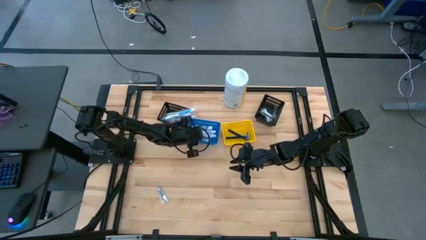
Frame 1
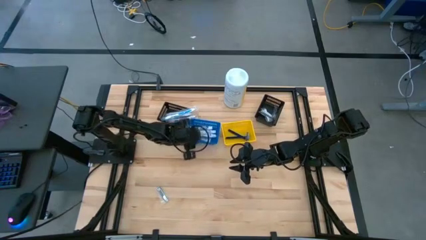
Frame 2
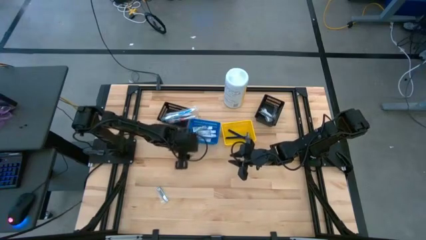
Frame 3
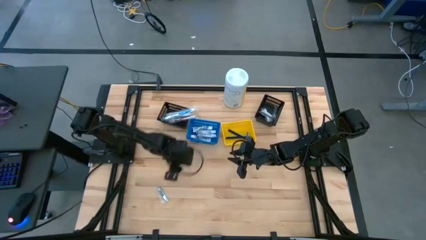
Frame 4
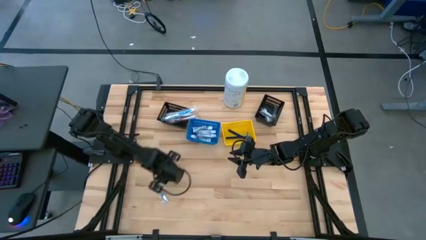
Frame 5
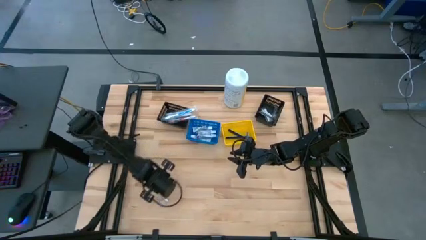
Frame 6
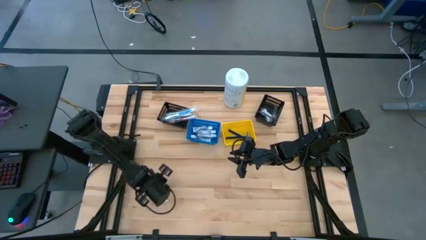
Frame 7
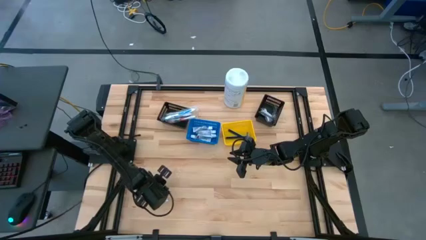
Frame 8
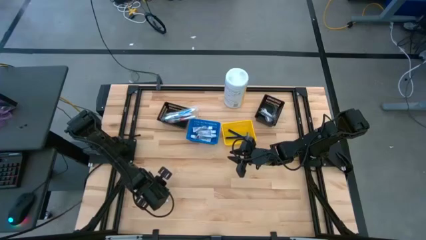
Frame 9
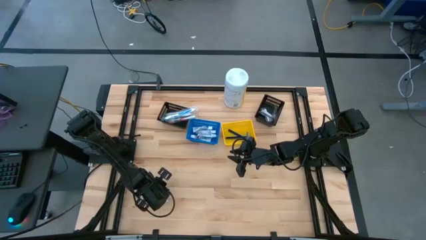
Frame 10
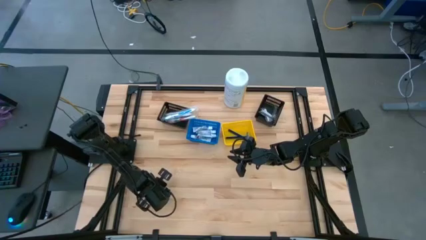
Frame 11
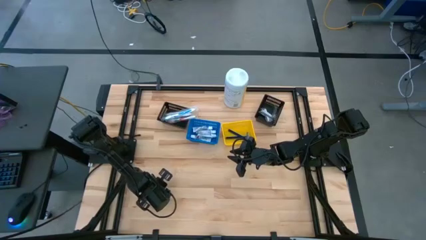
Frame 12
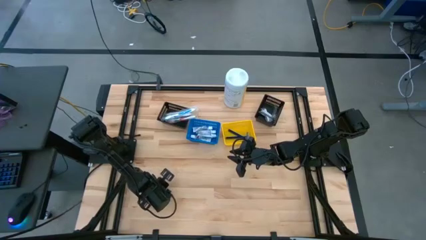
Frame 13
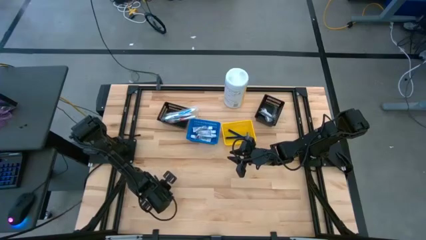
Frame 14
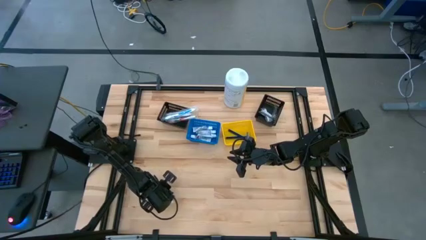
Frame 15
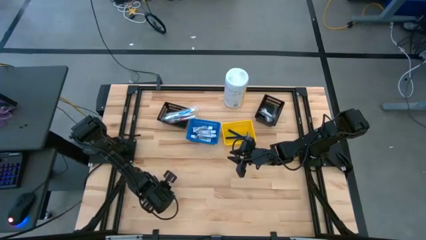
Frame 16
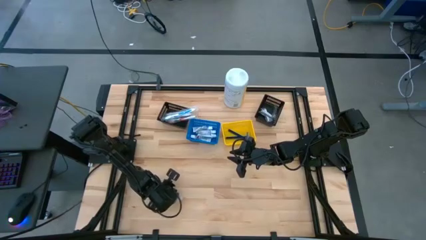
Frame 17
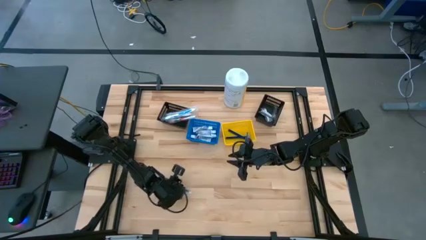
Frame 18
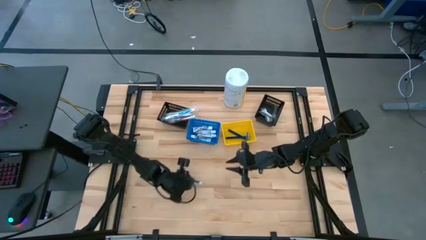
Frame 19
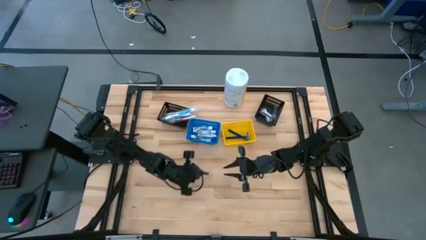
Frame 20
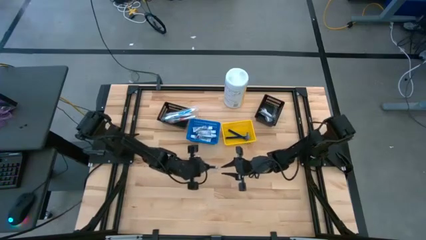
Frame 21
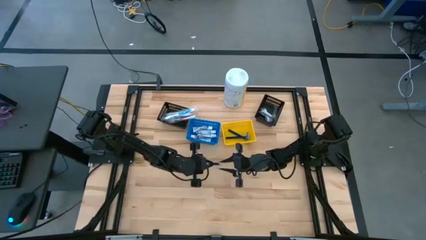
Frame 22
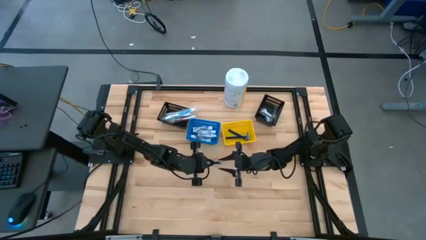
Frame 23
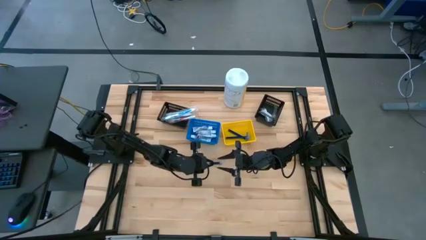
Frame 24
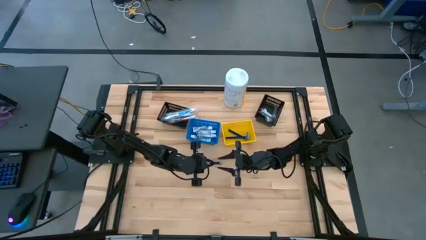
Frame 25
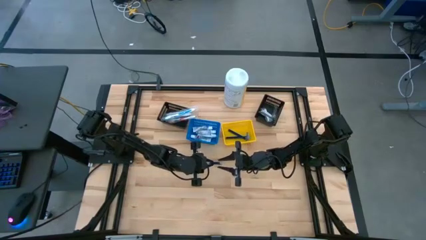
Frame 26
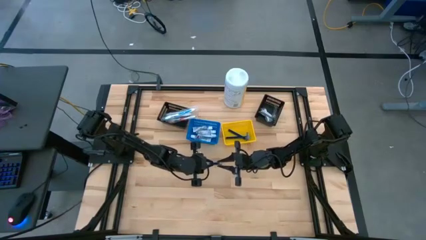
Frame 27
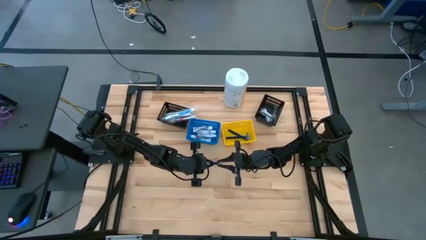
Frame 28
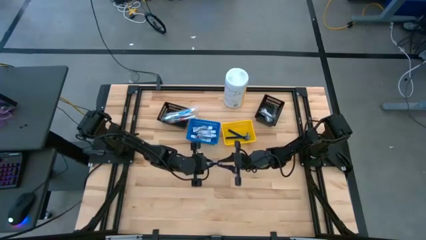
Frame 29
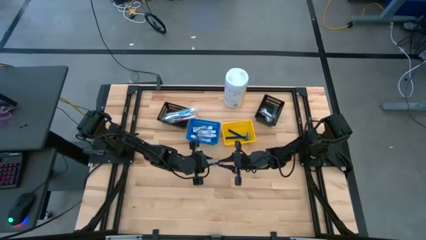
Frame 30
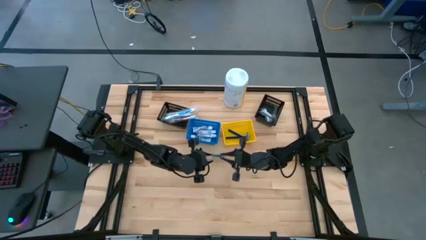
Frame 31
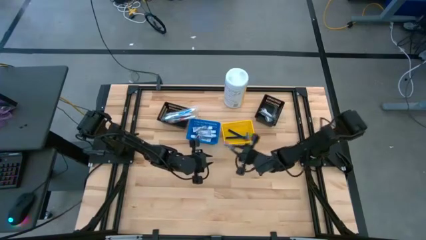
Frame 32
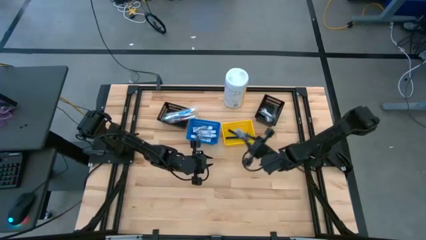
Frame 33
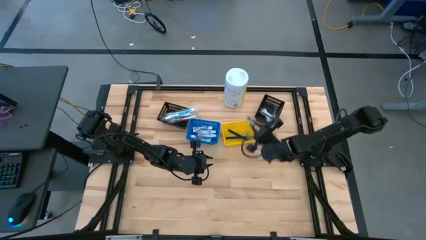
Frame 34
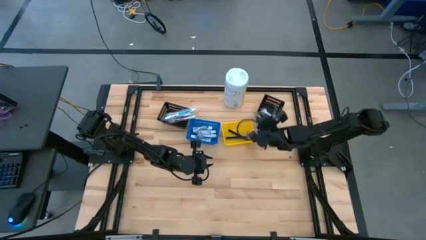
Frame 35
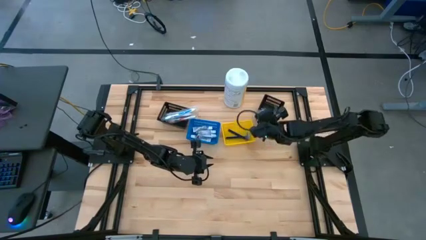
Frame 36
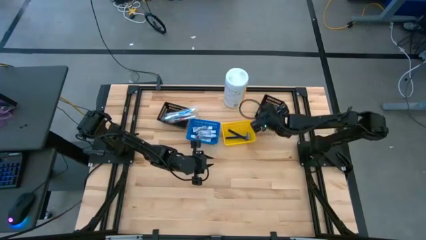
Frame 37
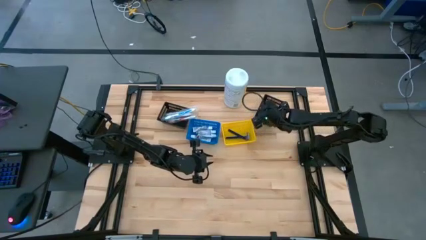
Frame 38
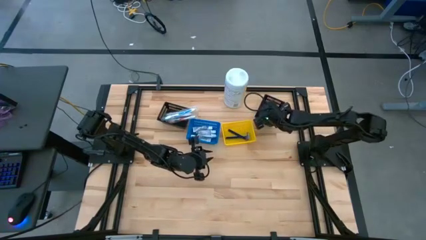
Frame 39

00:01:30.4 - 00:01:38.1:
Task: Pick & Place Travel size toiletries
Put the silver nail cutter into the right black bin

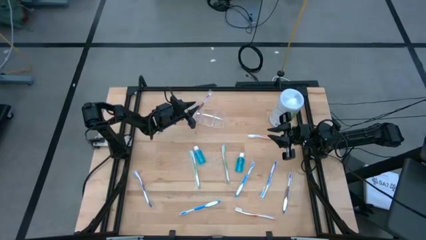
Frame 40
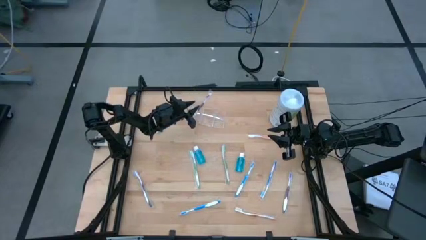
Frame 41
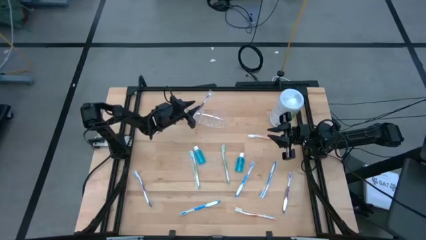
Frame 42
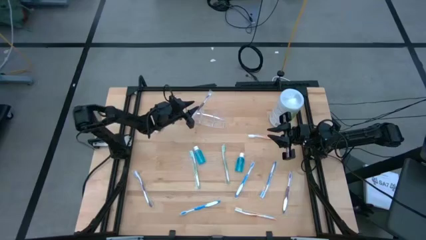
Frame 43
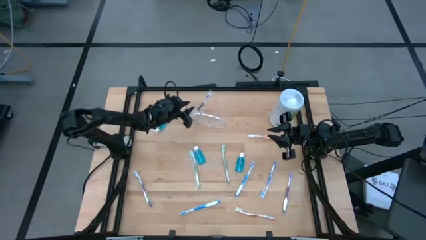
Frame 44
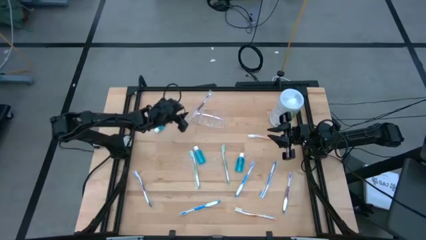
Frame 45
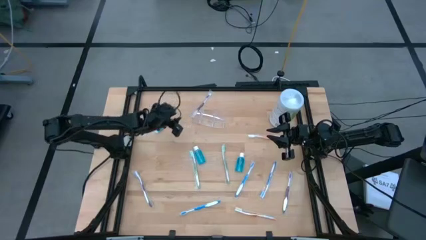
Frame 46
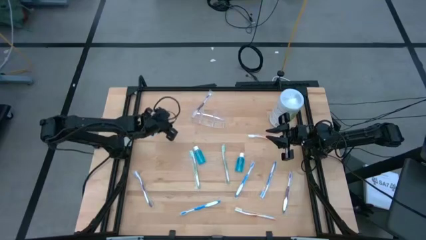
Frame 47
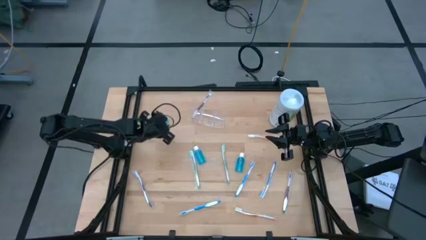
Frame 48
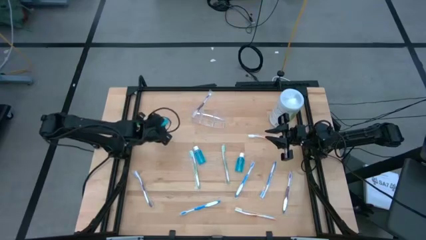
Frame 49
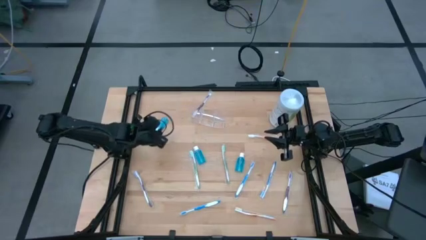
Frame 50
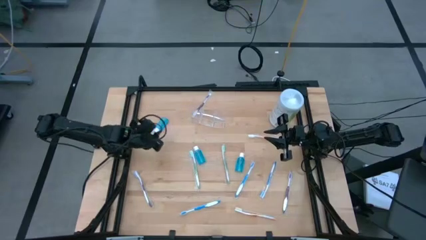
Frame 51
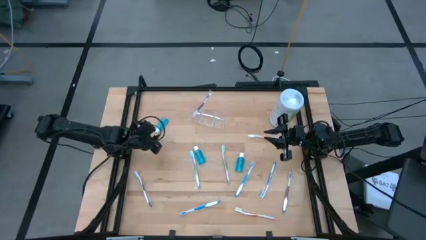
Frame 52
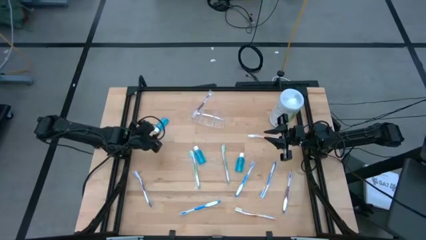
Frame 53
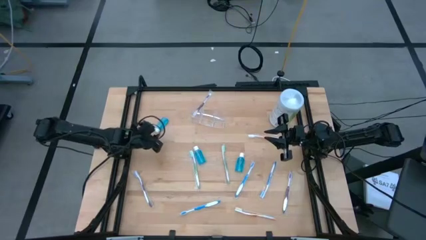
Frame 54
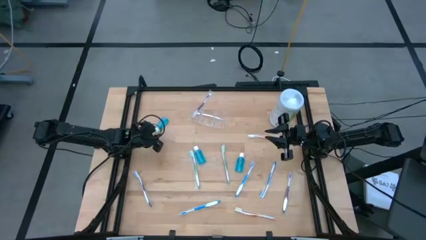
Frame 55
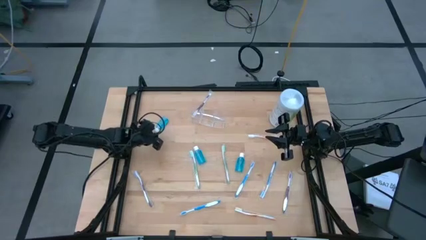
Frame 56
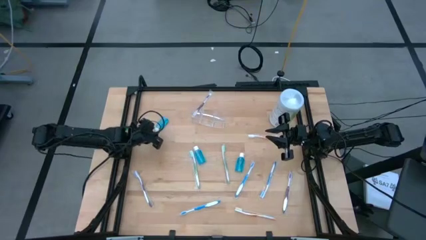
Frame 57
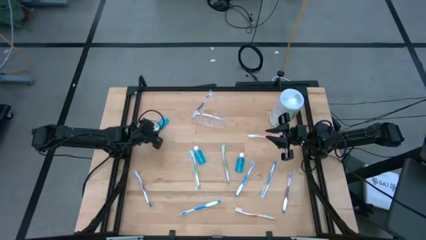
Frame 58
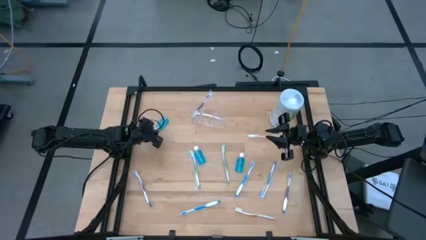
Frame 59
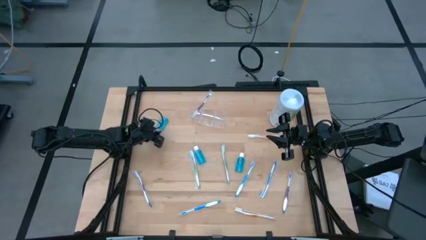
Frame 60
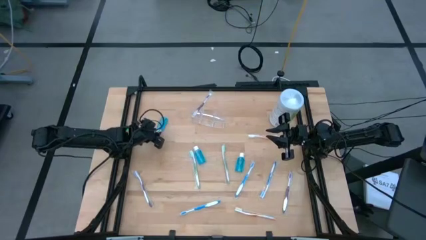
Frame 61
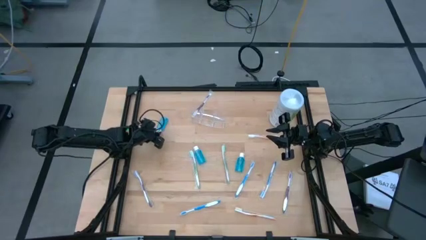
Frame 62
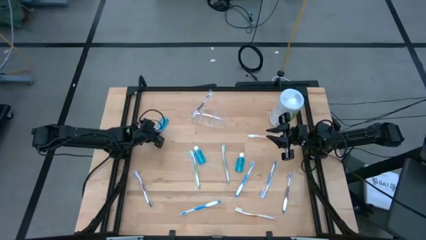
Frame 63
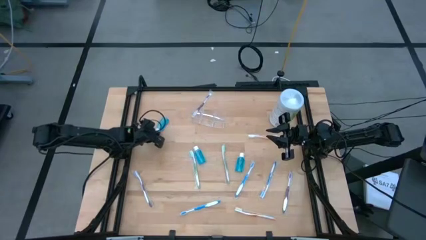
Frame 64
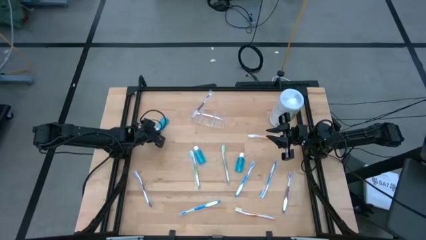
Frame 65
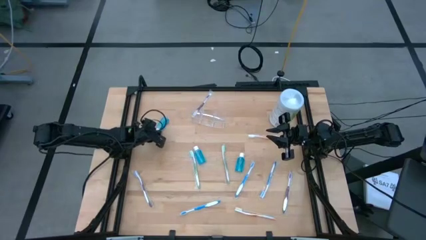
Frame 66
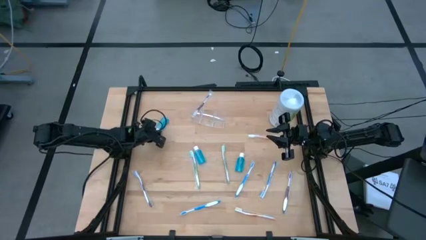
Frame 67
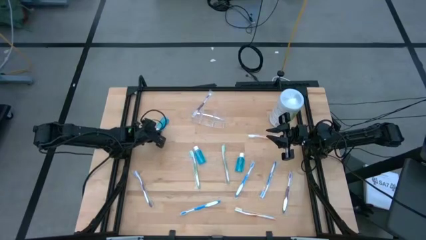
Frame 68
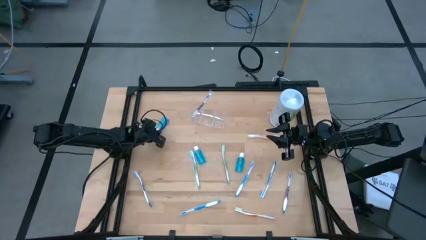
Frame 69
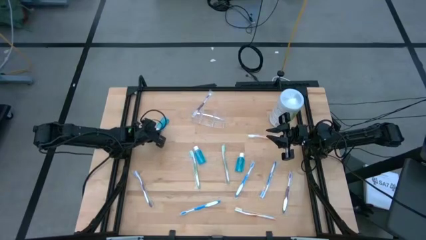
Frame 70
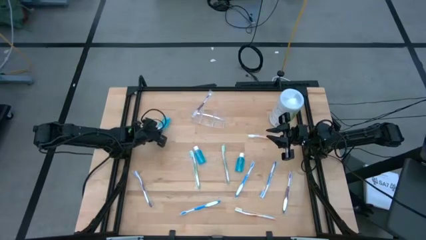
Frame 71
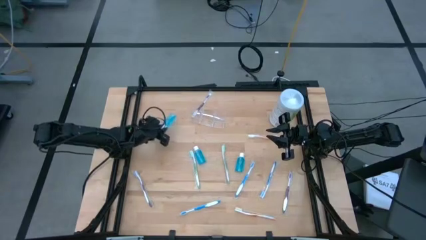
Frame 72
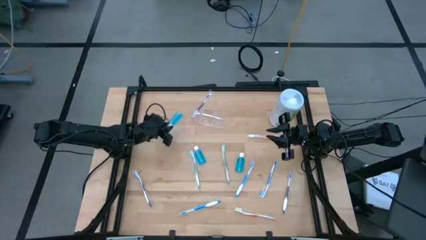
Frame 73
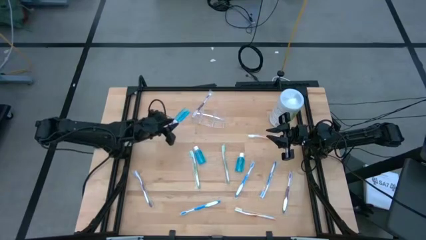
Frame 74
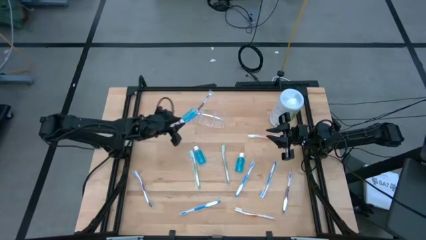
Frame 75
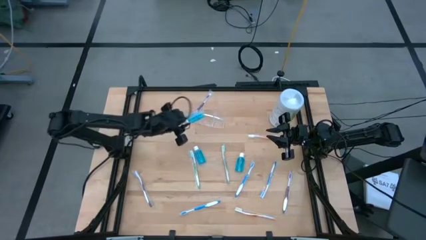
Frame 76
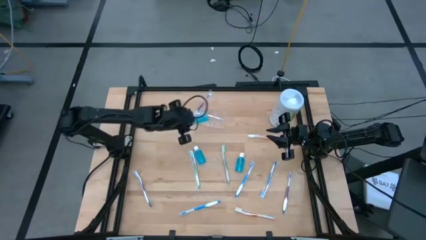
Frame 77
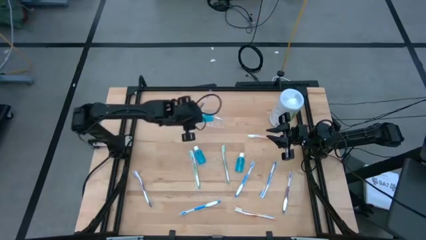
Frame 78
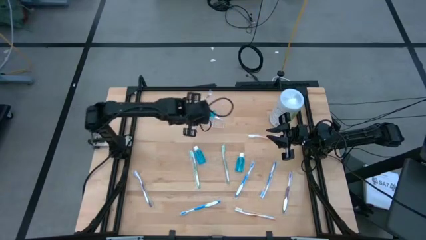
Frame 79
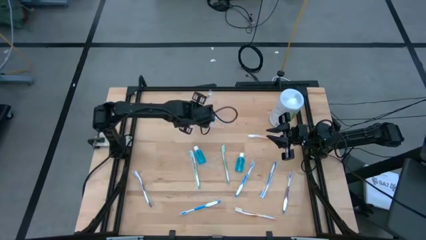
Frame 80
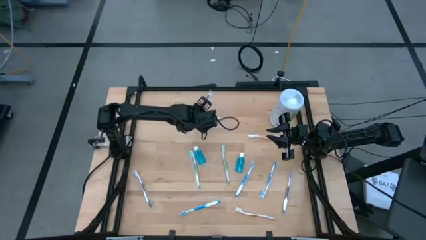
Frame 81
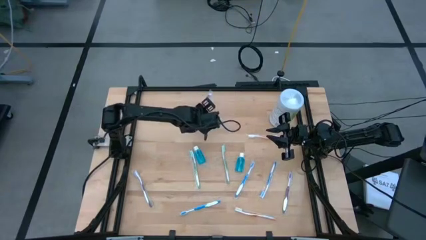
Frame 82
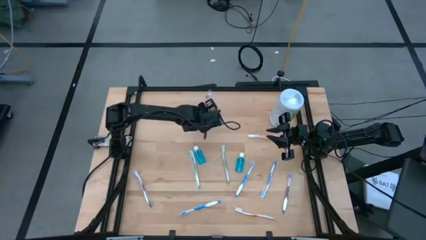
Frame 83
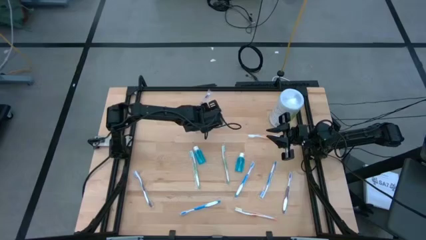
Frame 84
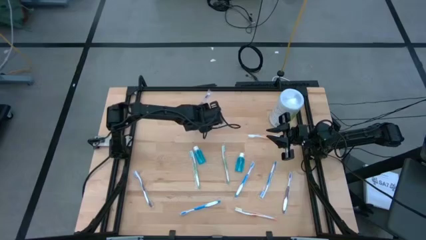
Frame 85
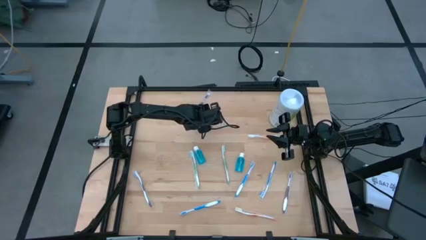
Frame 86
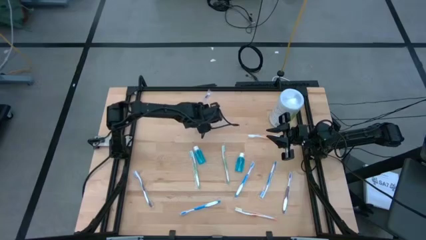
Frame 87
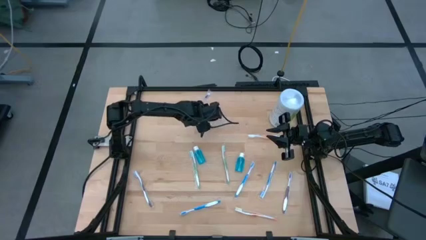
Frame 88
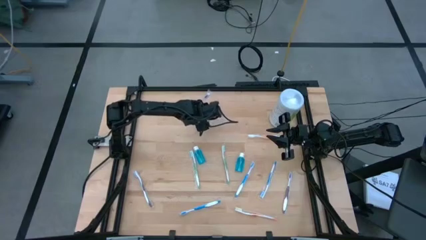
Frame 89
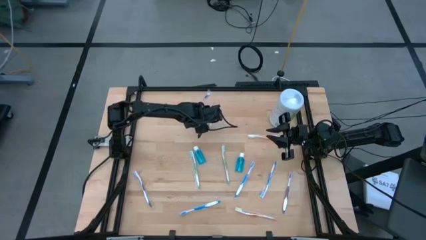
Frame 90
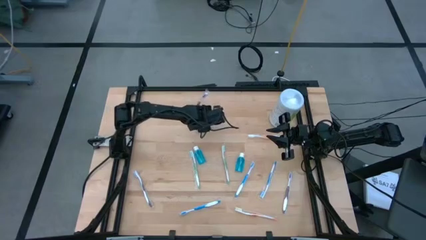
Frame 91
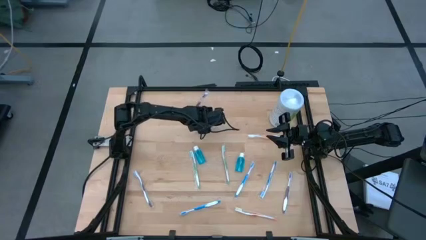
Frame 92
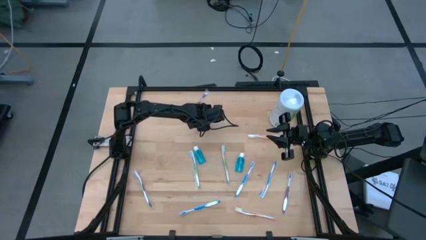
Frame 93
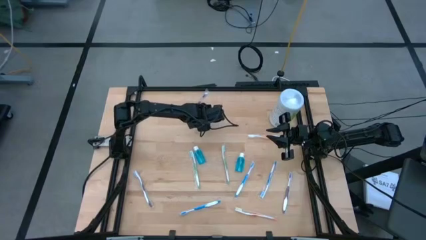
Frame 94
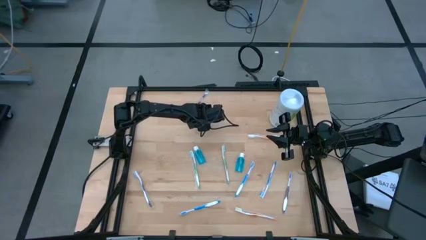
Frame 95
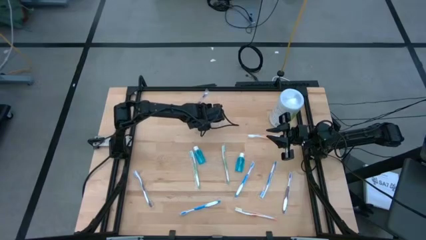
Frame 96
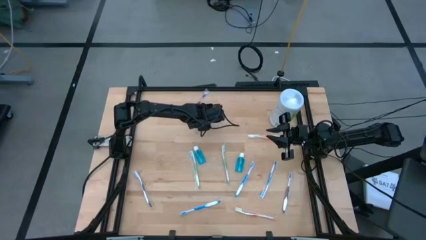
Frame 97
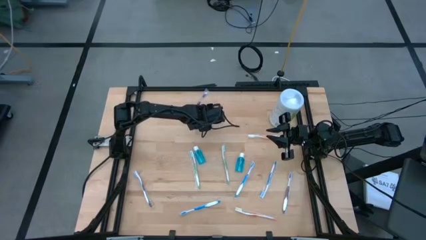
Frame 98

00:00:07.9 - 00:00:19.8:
Task: Pick & Place toothbrushing station
Put the top left mouthwash into the middle section of the organizer
